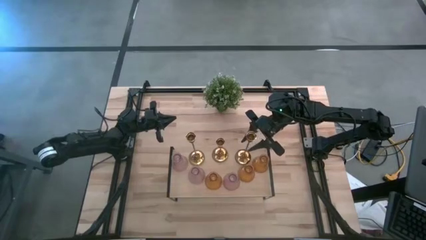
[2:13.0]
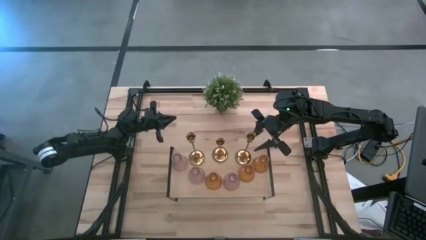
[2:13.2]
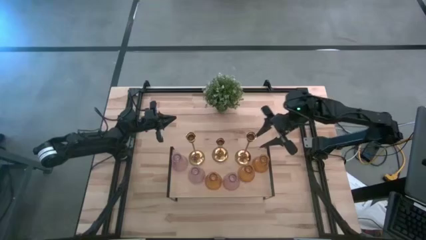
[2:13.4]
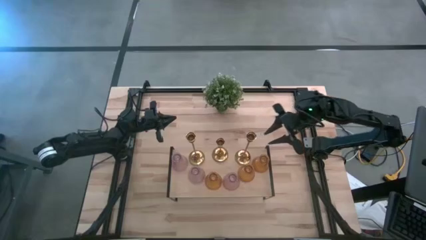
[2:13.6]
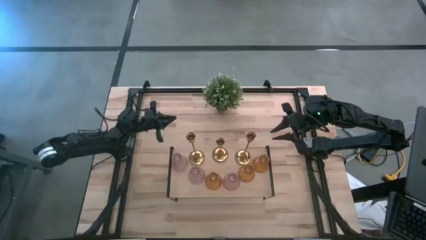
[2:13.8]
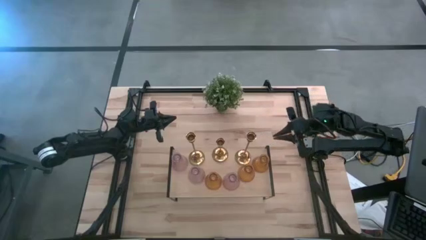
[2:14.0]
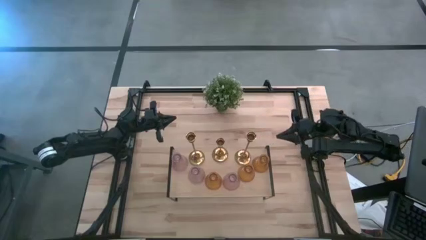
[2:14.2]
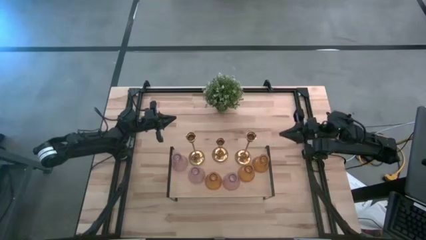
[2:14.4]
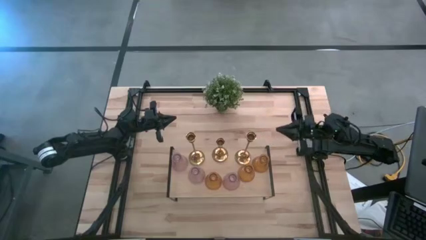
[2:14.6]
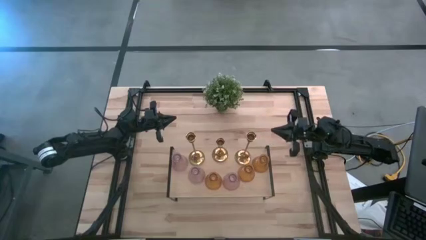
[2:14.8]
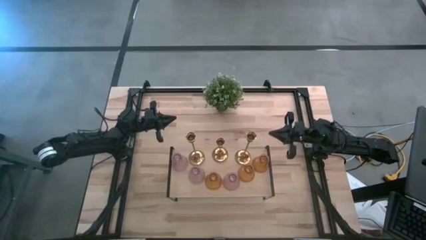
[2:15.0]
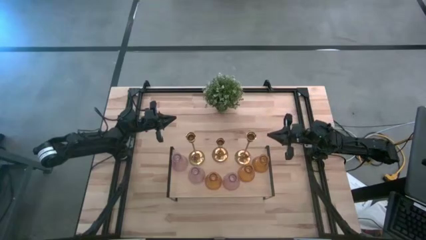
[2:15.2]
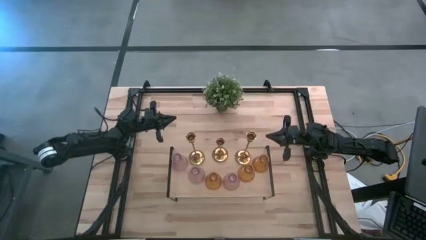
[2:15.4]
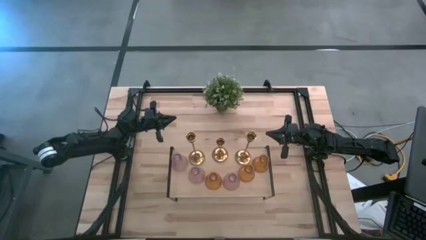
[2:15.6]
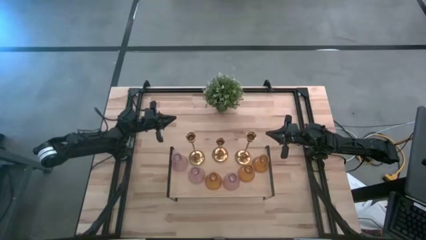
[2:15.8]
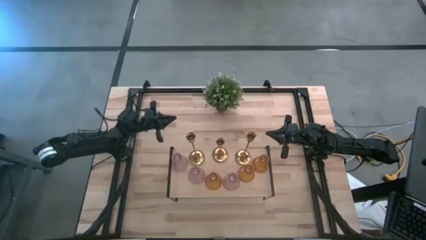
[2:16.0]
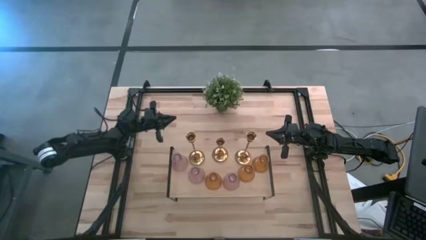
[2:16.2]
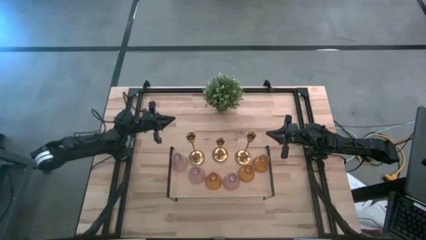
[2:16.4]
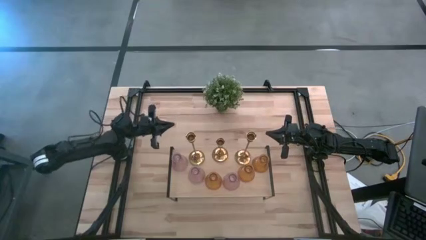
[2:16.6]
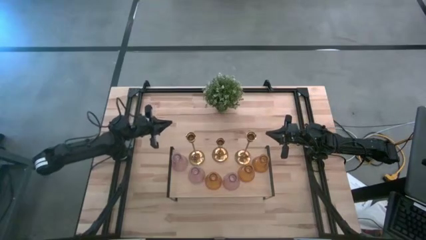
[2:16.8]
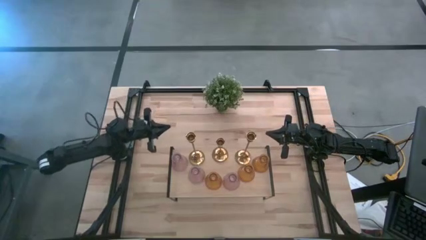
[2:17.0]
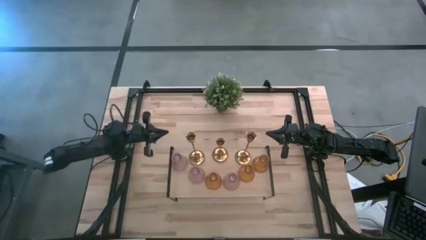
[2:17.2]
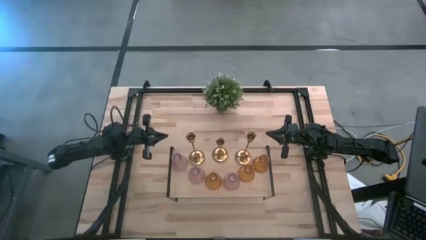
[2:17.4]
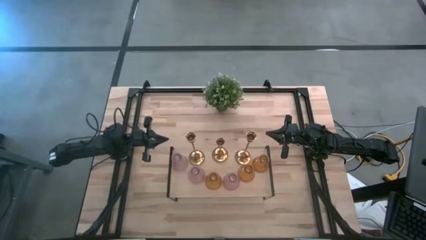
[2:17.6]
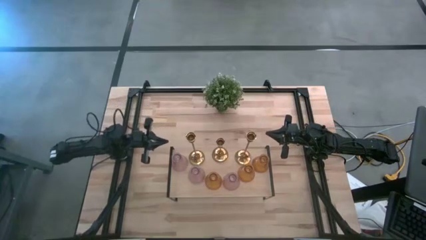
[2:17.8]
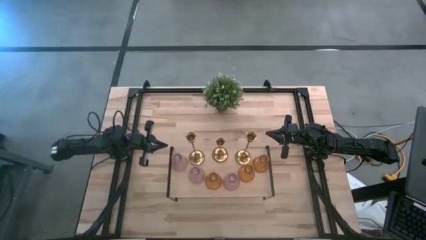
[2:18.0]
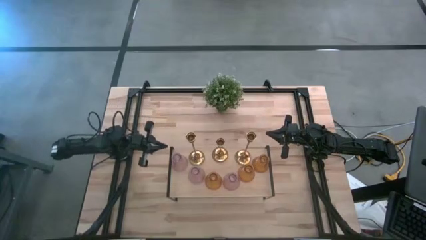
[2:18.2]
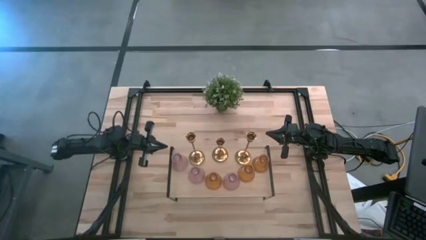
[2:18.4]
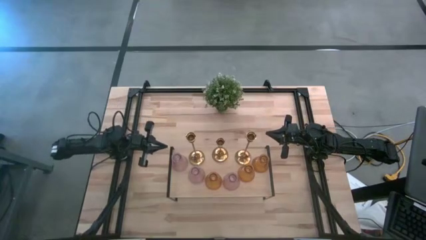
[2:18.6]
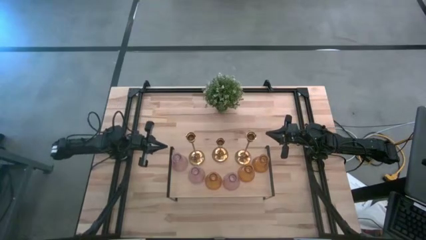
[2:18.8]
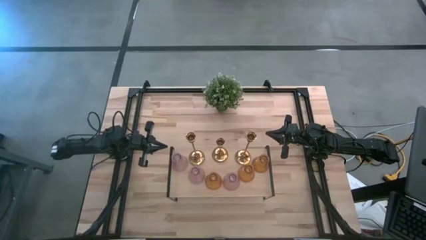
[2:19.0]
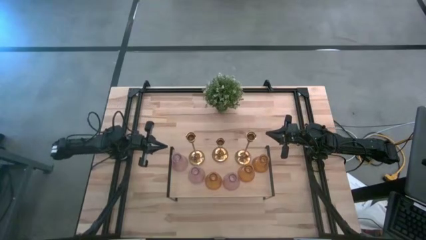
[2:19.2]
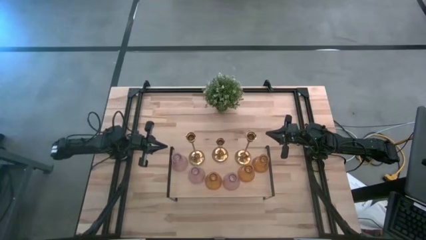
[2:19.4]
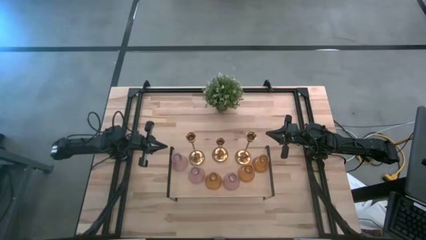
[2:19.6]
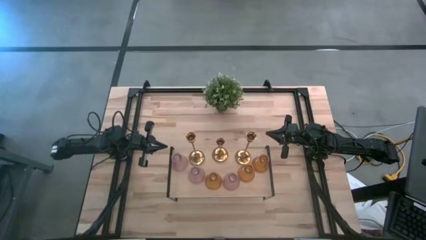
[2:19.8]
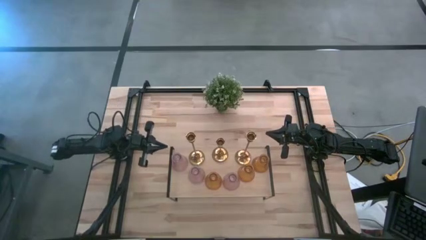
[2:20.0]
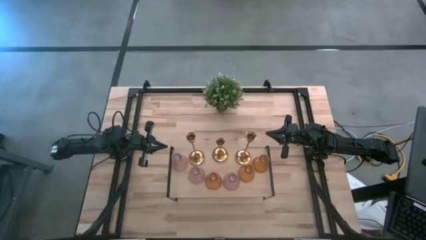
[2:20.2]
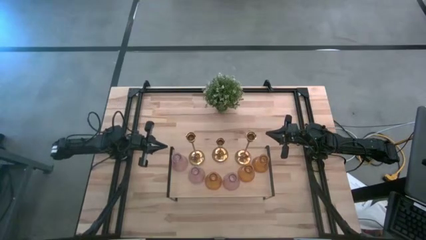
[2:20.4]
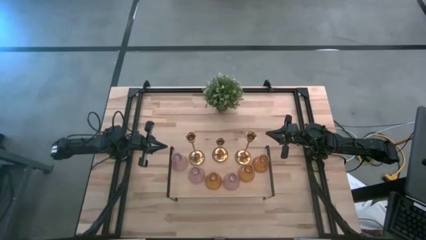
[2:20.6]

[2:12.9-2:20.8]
Task: Pick & Place candle stick holders
Return to Home Position

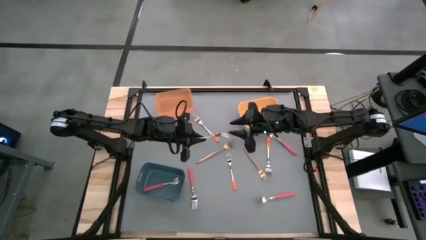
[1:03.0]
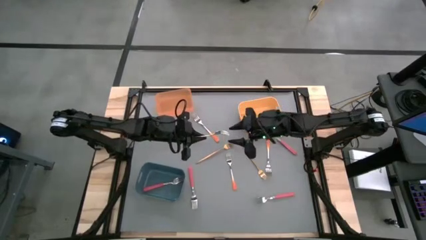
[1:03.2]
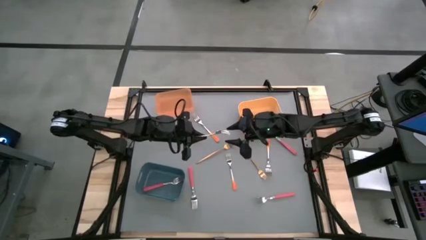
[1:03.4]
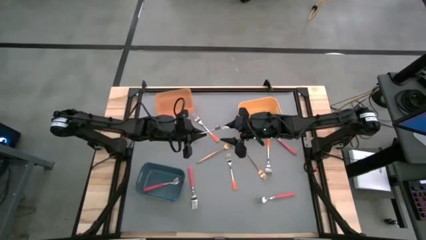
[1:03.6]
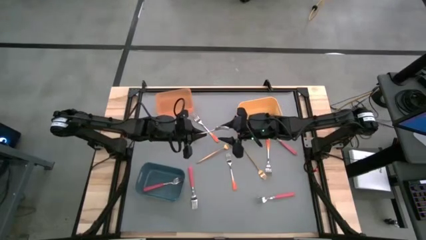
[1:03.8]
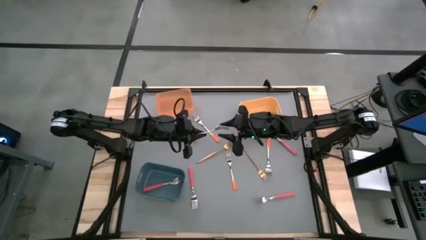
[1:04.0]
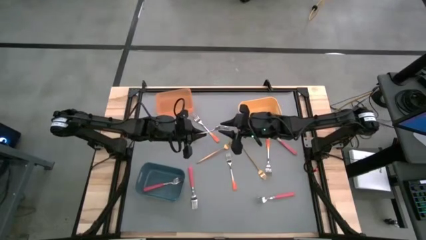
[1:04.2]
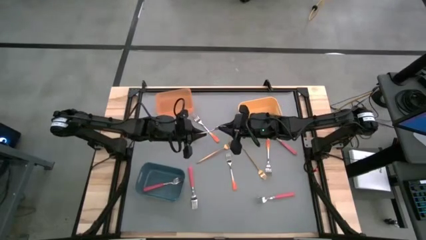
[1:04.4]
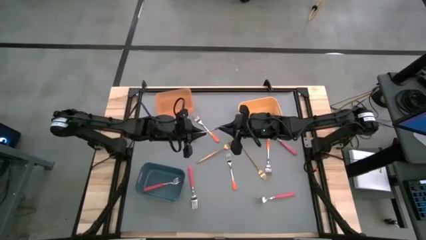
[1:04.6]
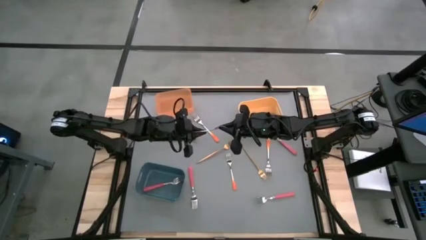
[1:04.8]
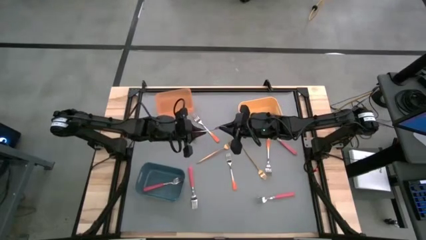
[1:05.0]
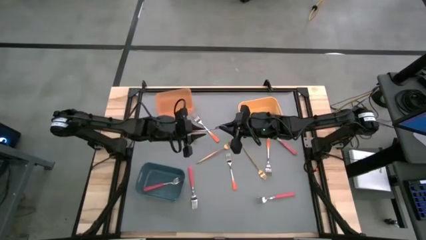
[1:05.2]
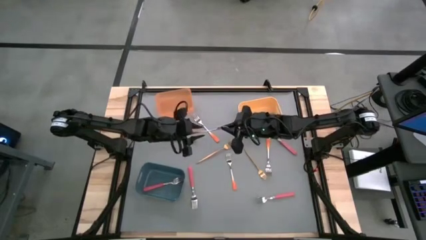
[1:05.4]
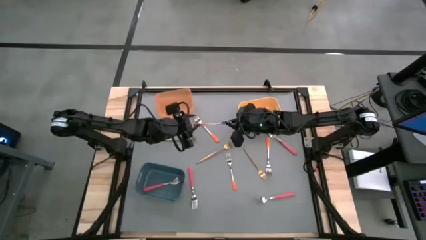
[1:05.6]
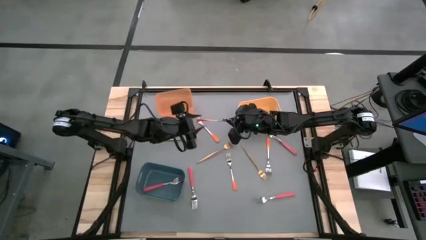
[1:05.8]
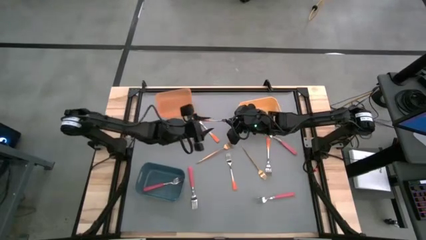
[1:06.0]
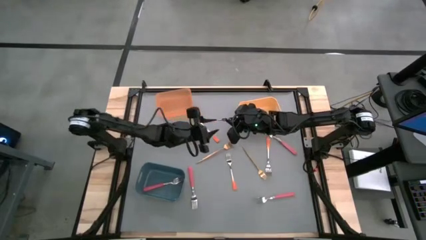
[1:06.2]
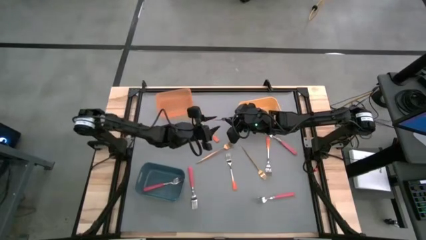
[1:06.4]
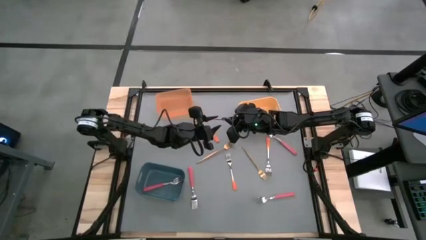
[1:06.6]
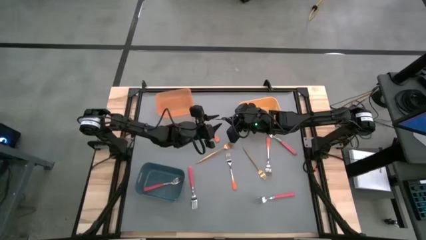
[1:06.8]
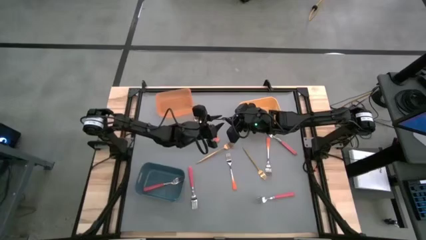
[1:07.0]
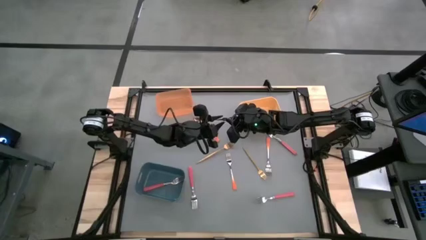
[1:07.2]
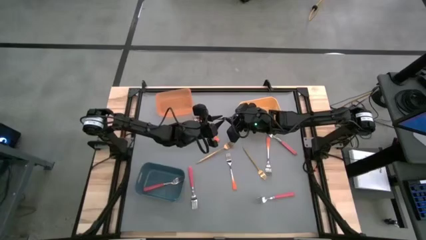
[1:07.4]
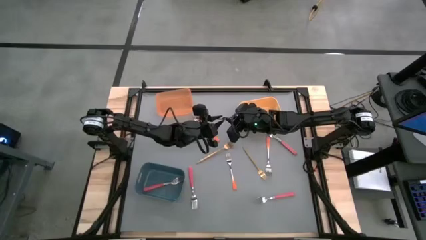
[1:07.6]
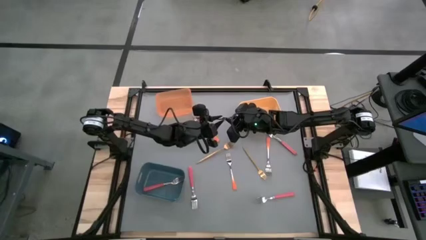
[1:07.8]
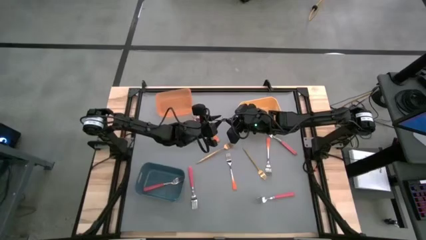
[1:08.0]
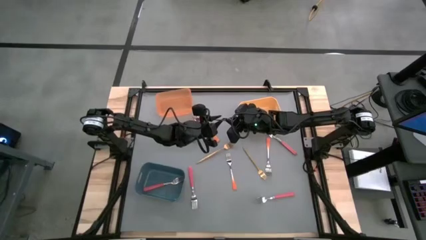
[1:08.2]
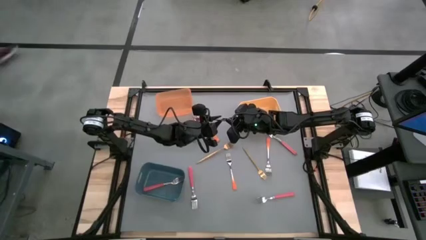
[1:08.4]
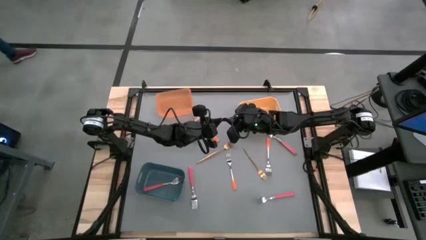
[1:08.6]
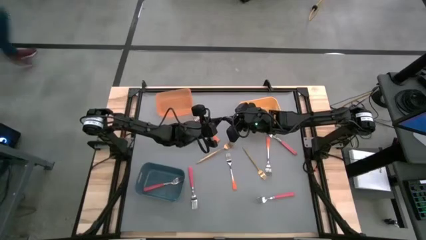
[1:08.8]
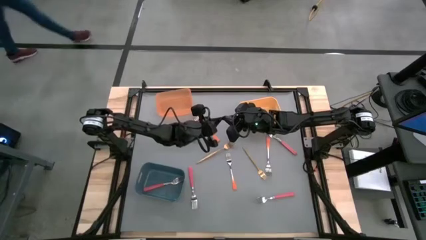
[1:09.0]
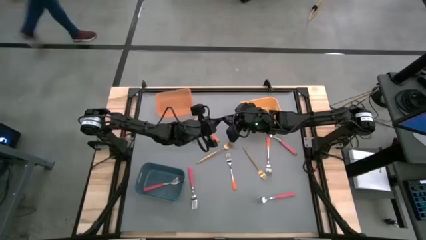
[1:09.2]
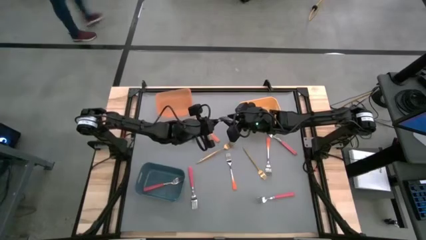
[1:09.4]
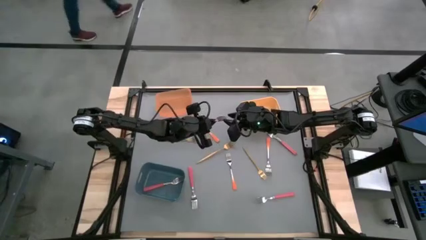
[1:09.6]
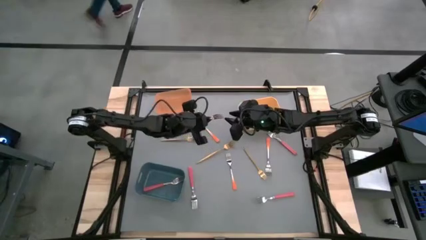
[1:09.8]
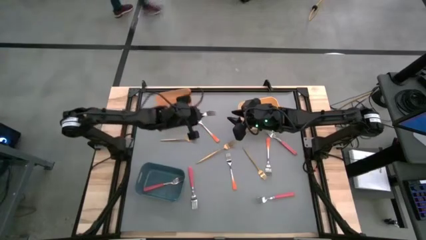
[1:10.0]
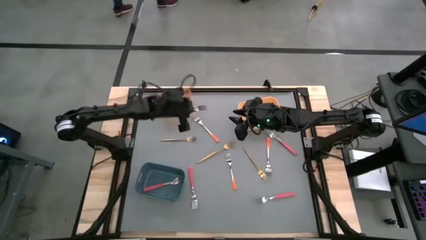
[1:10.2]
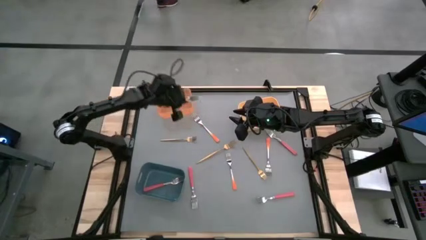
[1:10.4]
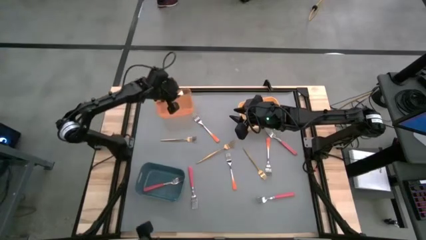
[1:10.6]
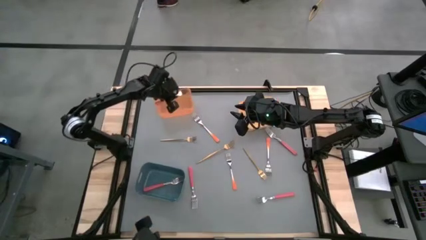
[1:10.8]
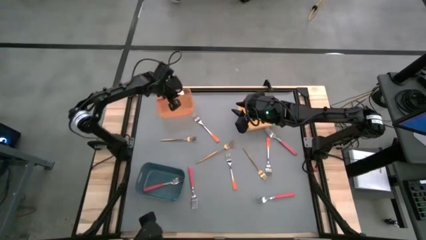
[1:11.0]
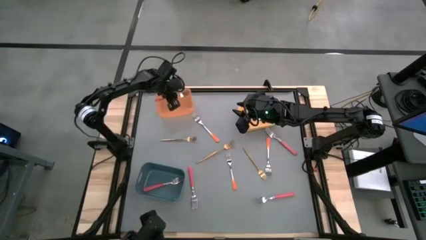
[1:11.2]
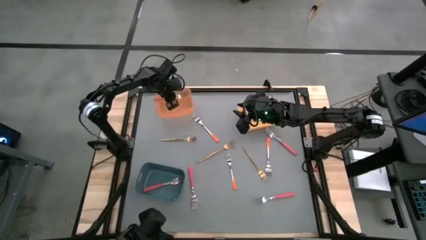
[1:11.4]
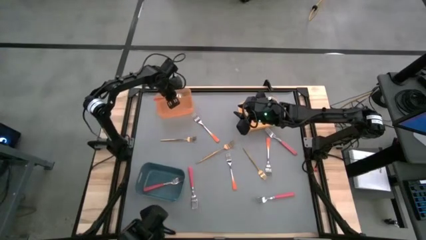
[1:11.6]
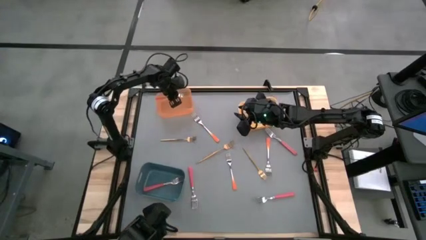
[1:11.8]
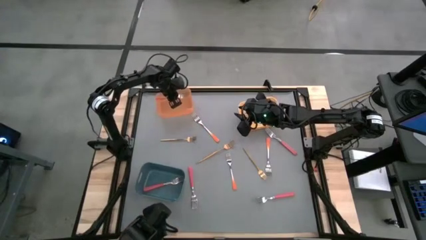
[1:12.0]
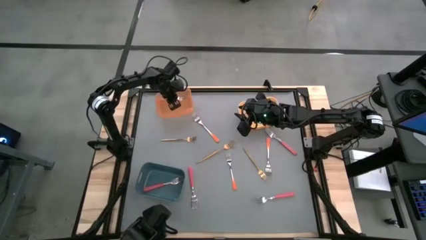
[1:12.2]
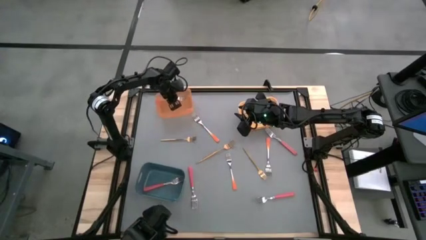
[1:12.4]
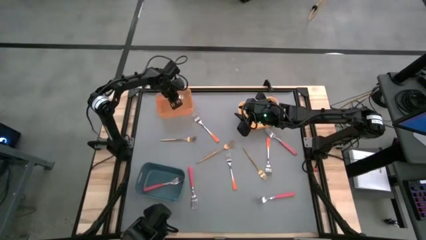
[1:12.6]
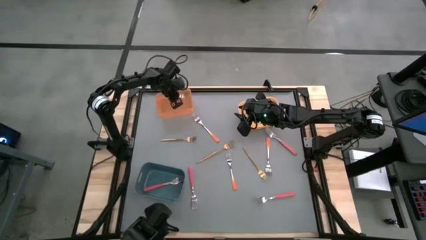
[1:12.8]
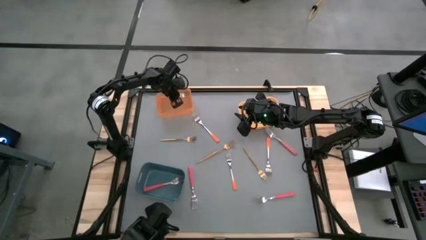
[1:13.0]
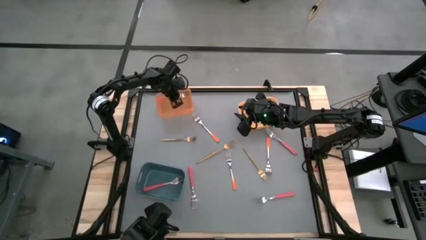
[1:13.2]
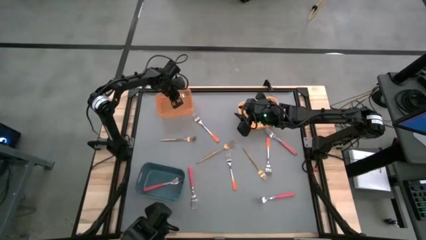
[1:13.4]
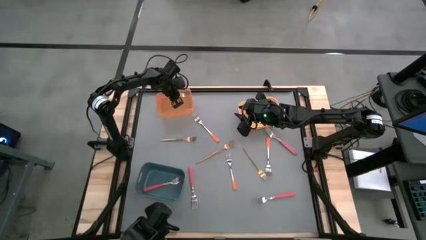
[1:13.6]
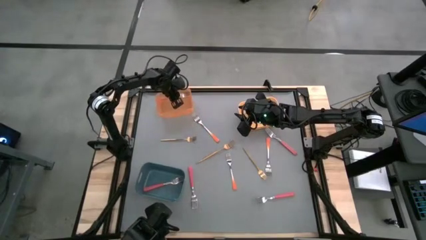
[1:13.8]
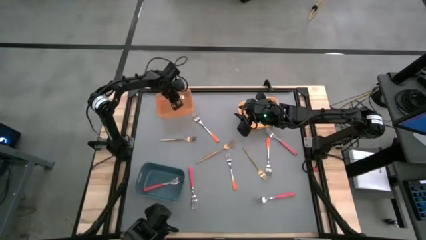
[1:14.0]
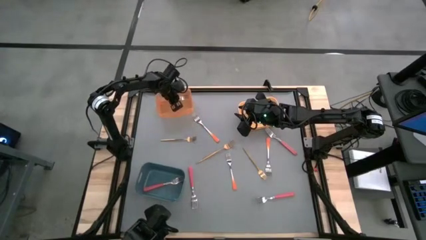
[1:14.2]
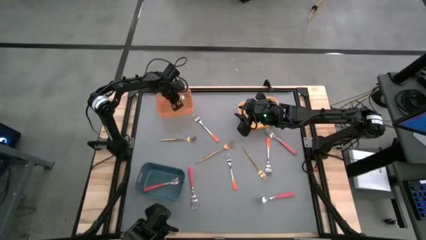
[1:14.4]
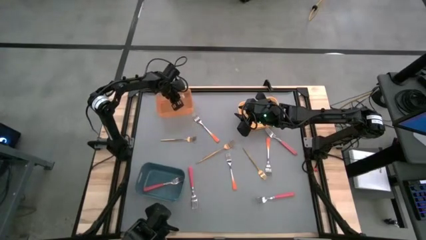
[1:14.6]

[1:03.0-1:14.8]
Task: Sort silverware by color (type)
Put the orange fork into the orange bin
